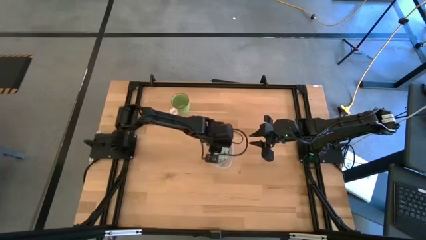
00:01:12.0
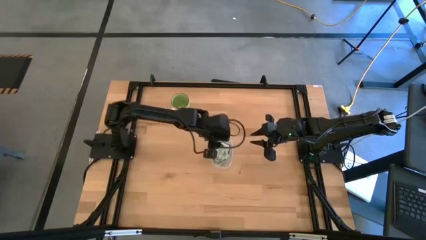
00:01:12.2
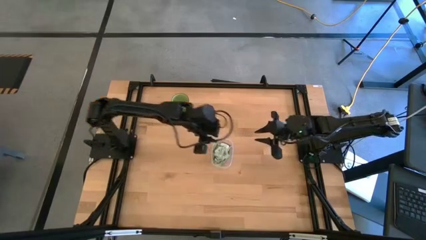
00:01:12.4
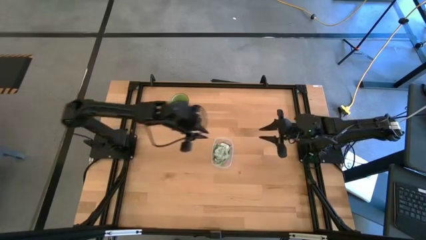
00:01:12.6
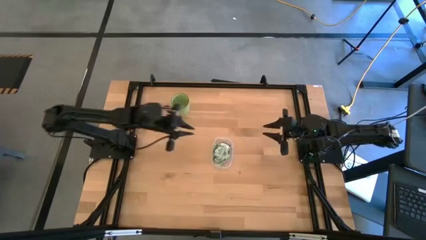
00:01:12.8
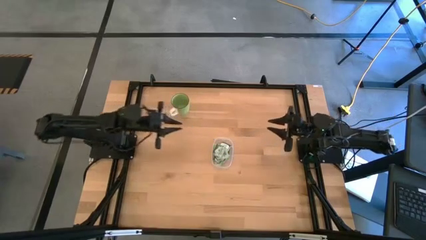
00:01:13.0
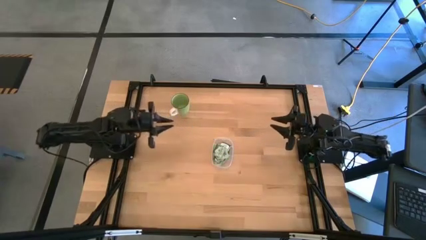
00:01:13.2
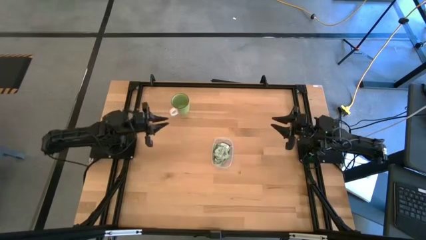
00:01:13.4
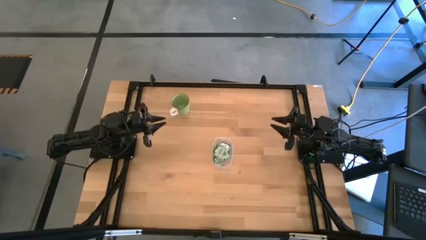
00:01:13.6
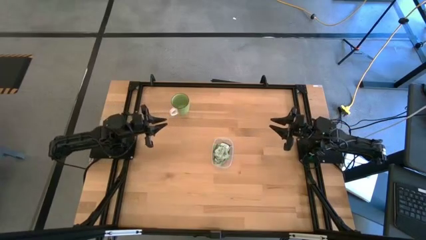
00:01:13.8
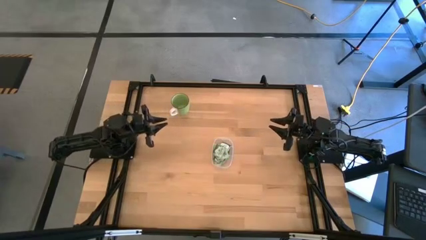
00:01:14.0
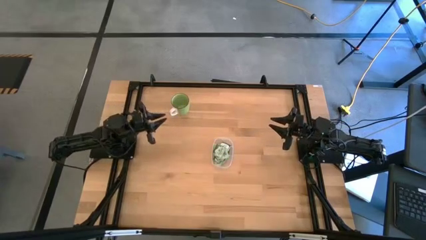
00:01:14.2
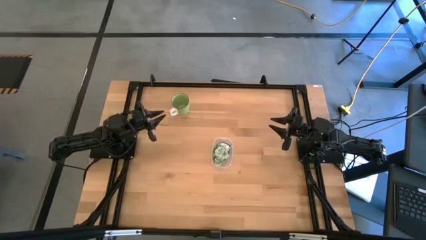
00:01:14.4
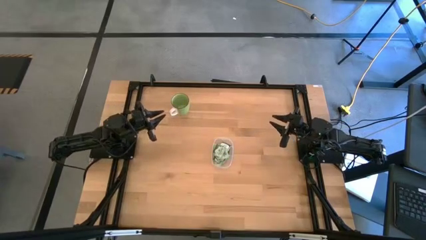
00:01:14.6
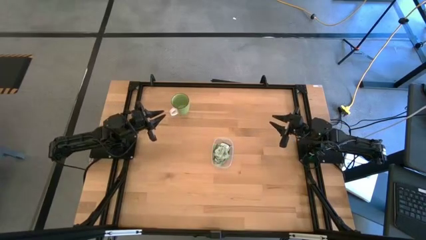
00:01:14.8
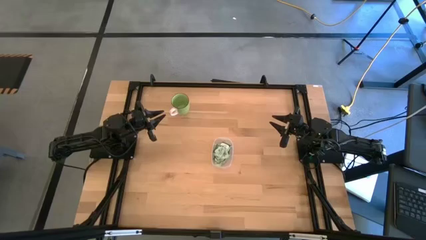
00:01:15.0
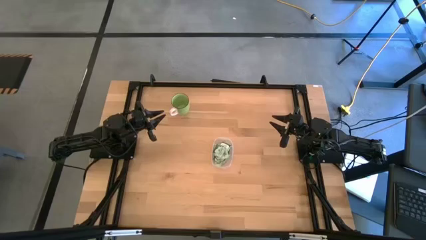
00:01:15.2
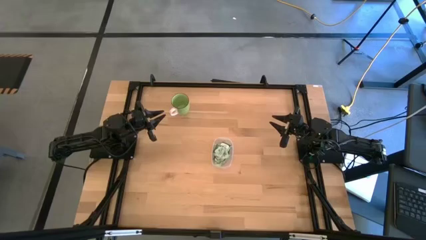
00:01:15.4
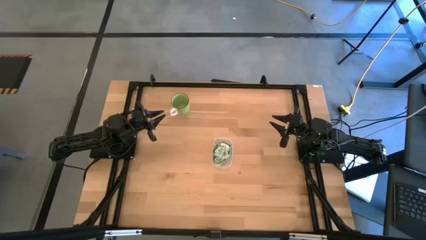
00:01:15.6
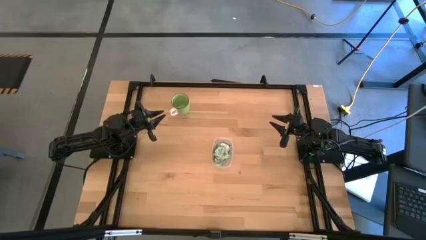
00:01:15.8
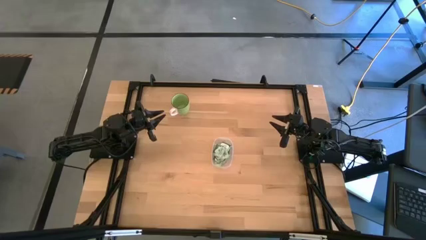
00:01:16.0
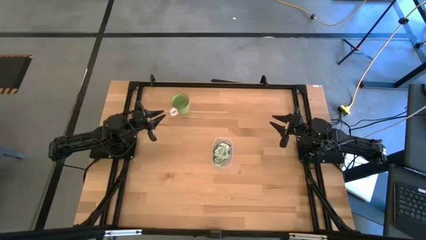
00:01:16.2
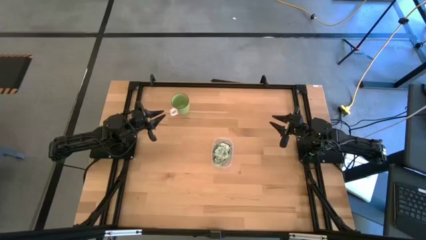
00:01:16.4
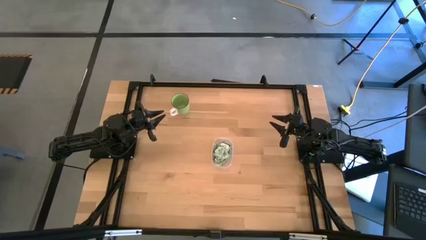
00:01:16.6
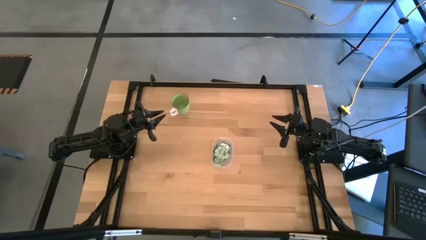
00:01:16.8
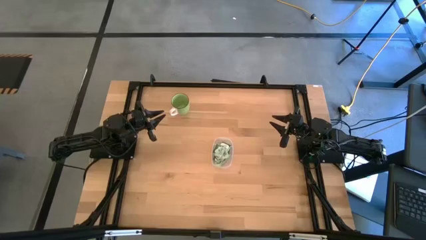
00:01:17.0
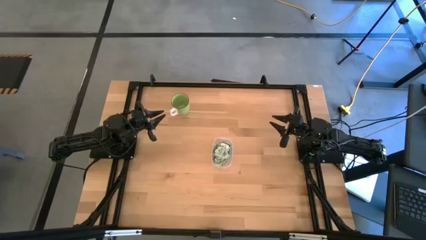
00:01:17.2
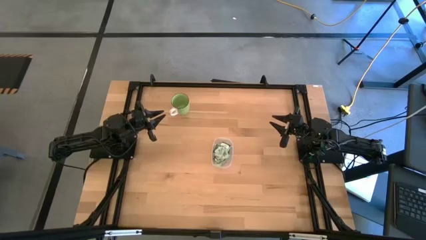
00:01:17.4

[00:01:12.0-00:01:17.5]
Task: Pick and place items into bin
Return to Home Position

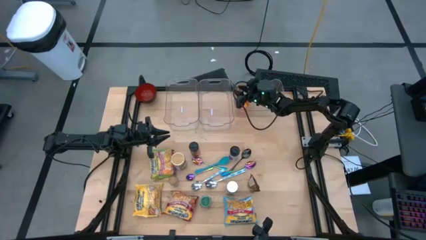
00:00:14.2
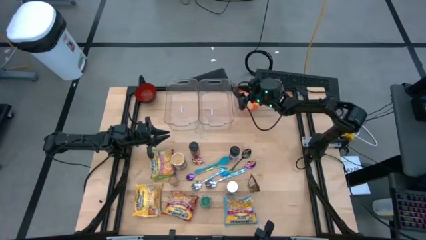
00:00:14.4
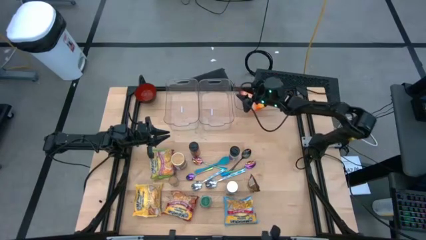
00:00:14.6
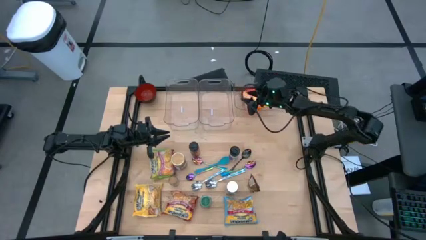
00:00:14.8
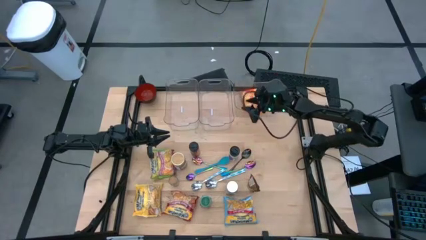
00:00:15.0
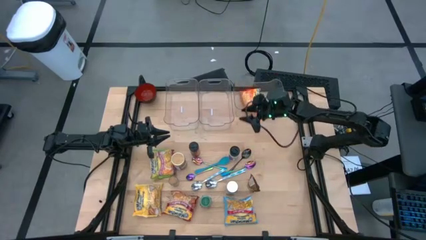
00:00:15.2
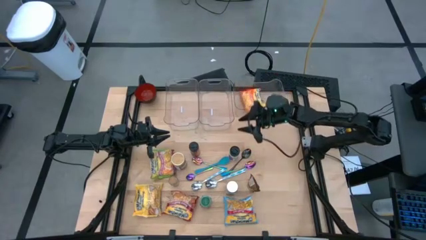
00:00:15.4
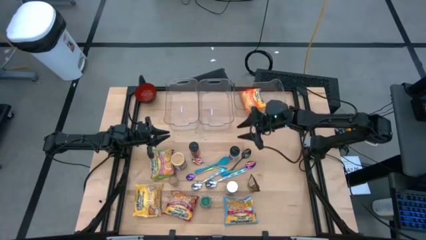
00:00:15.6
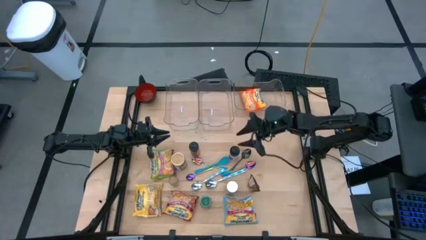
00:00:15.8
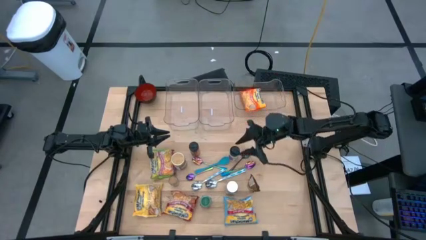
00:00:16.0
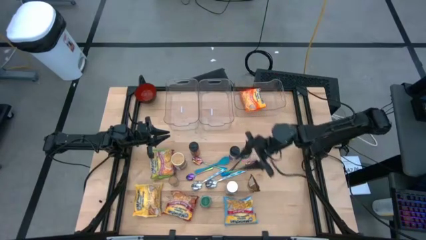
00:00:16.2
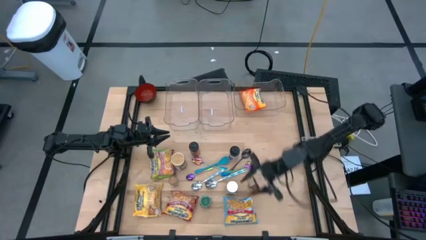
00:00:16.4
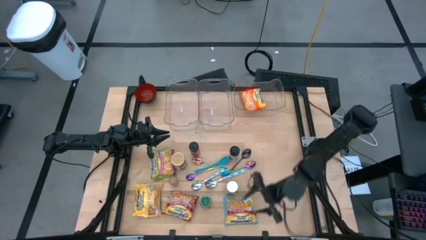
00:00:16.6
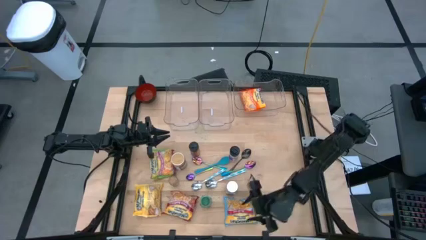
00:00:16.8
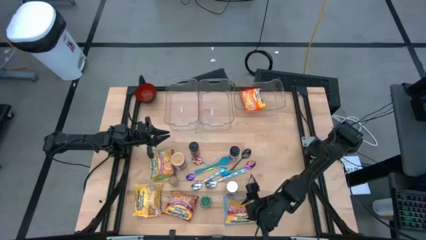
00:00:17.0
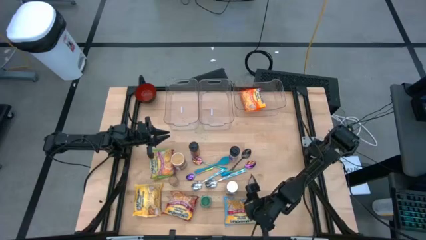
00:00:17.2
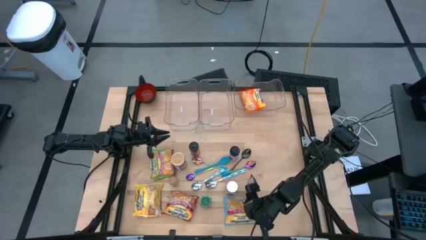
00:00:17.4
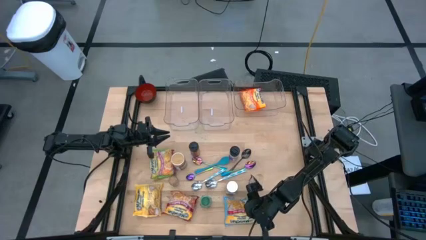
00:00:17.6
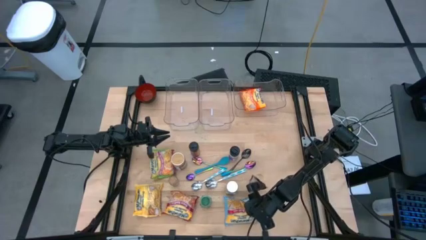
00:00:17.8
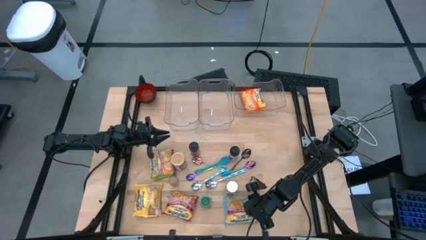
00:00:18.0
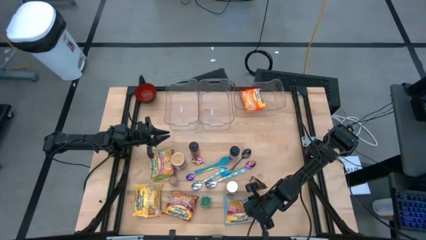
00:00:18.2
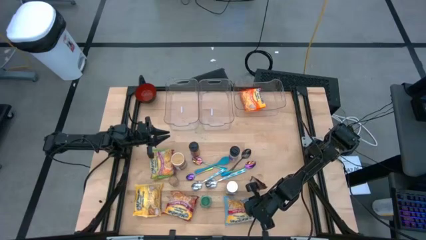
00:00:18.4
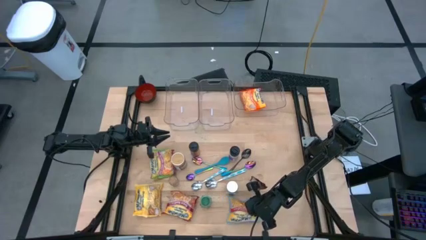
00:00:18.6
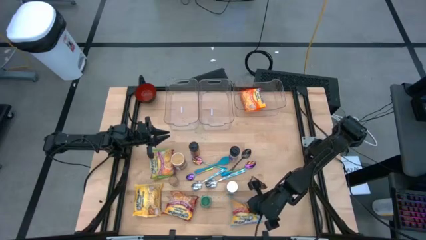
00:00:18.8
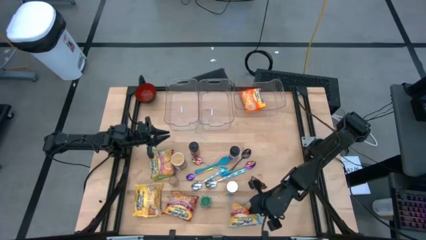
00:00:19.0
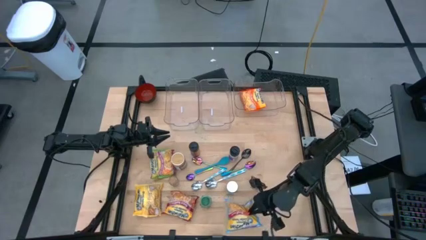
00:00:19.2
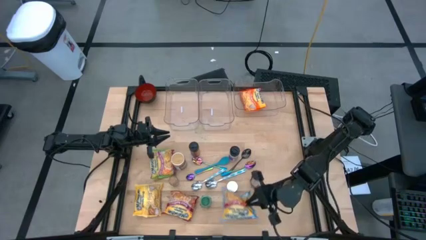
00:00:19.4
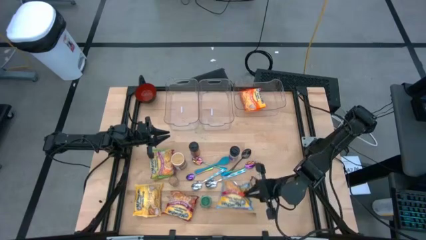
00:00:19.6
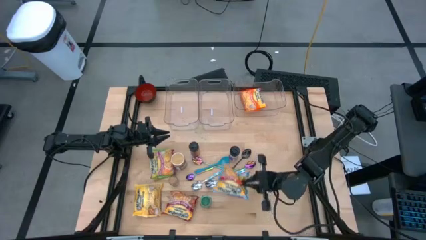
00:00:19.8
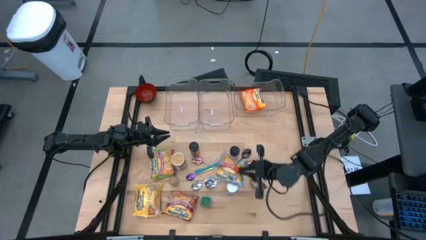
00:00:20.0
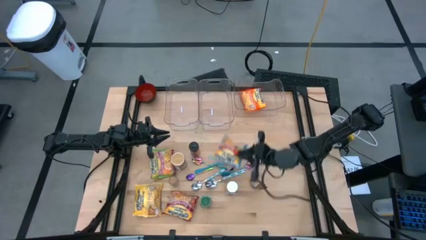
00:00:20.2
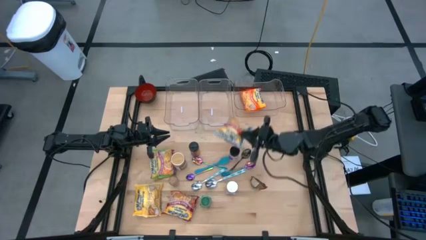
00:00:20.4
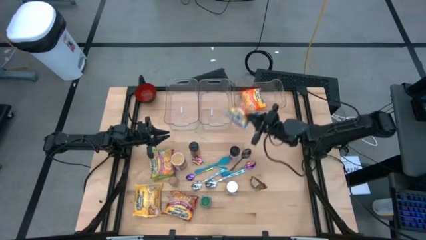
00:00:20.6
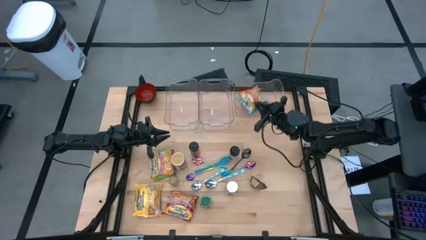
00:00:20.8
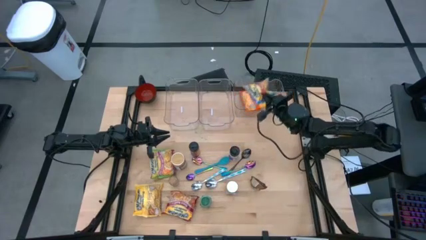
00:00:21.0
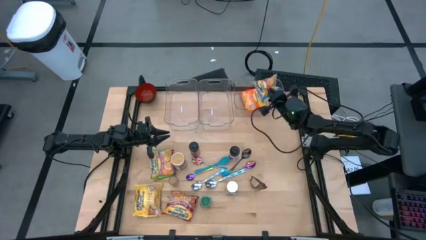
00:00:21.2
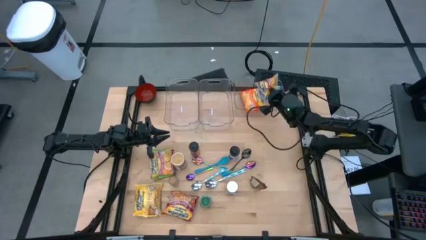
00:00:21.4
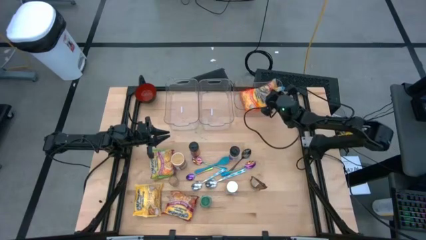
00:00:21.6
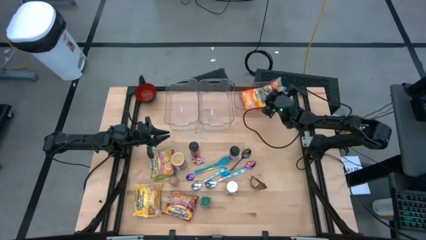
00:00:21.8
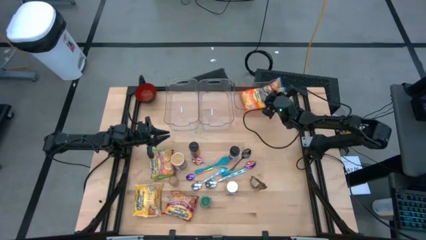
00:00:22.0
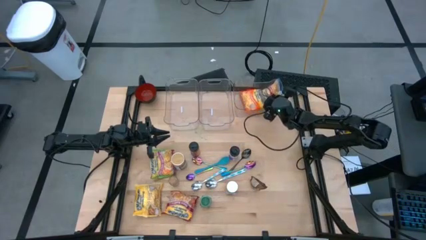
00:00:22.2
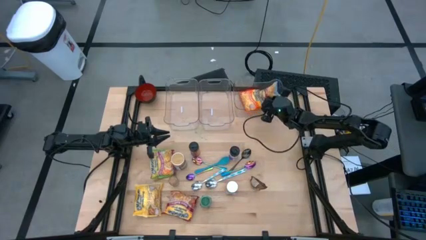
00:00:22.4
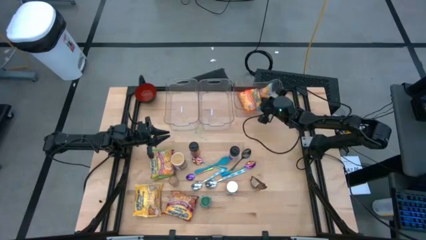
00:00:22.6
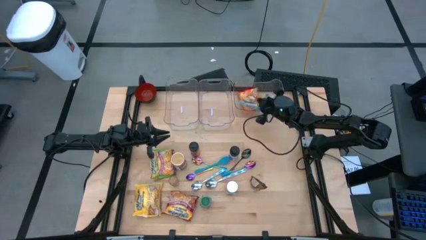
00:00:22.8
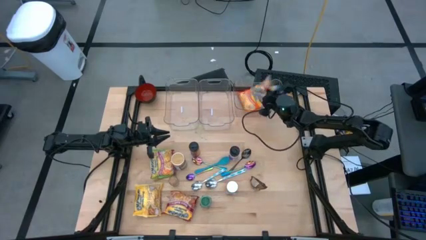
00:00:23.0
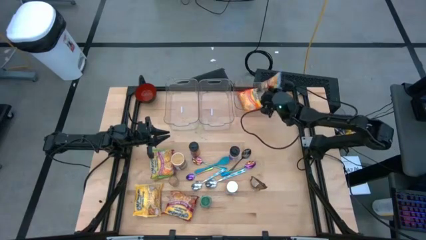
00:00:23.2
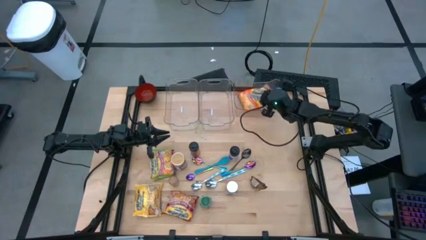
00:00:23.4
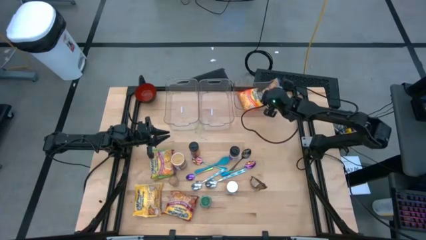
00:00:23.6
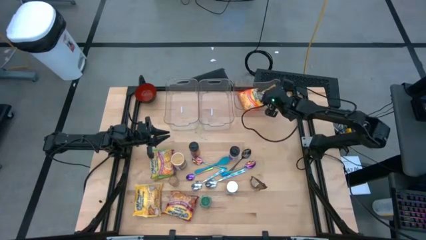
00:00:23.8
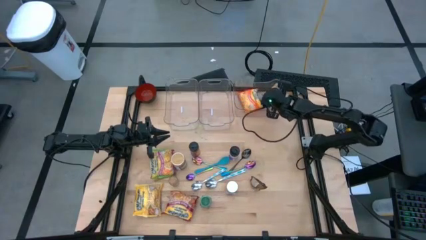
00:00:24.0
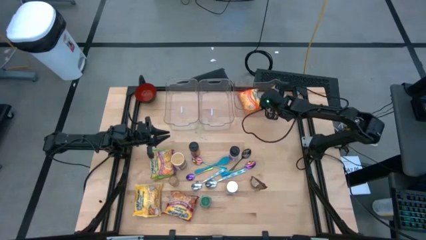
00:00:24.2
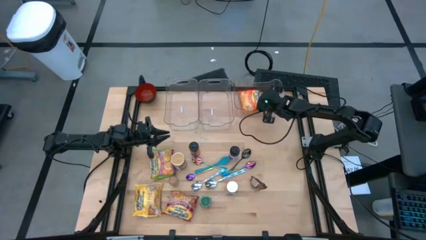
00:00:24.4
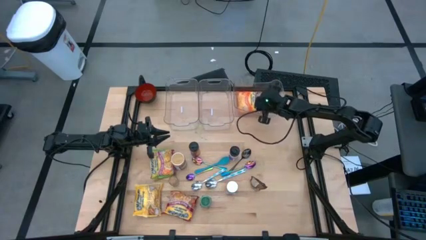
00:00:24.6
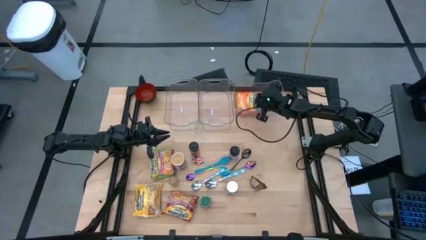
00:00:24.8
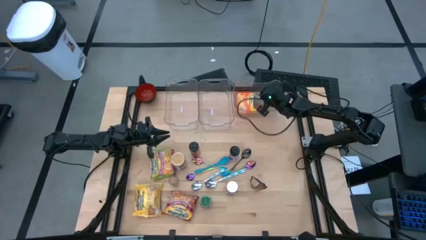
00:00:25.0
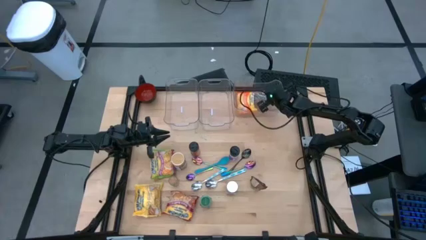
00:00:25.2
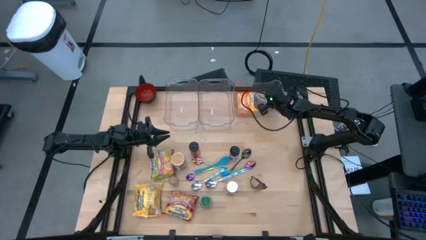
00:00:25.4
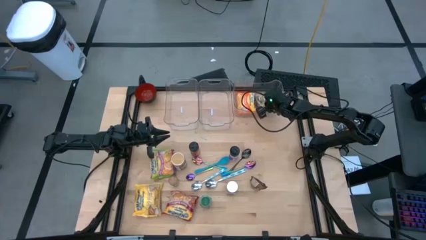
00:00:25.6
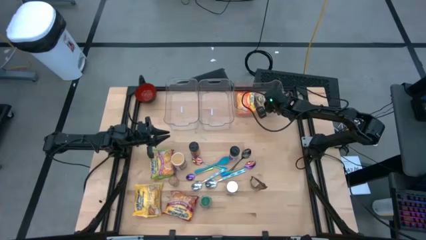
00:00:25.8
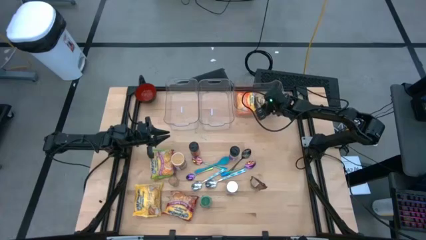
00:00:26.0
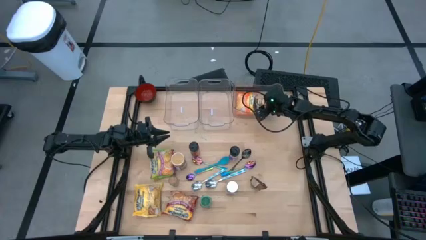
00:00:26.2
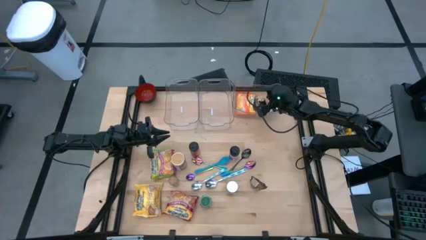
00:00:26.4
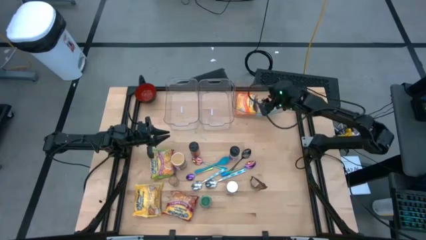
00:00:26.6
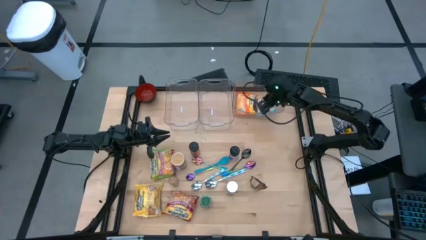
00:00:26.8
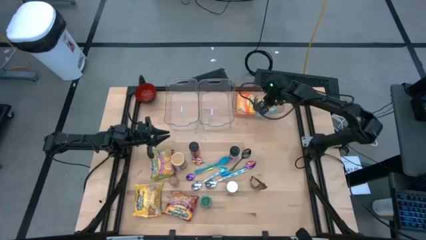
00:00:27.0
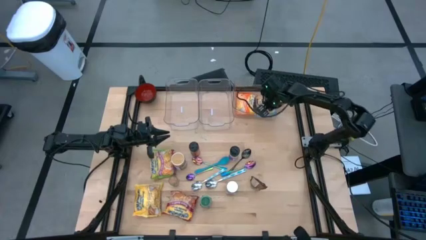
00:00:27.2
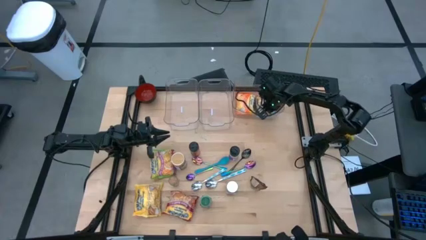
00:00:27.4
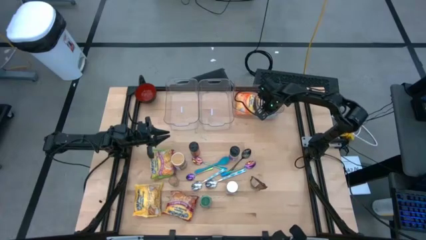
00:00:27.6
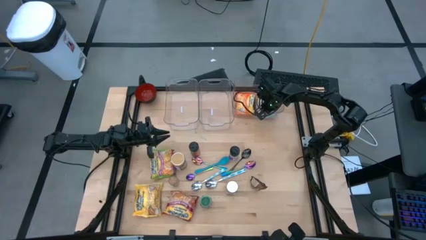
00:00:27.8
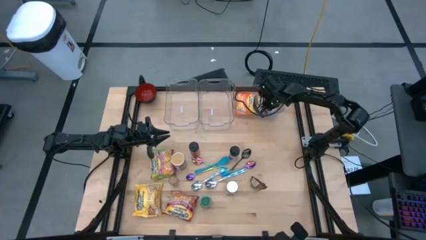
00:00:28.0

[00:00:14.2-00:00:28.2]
Task: Pick & Place Food Item
Put the blue noodle pack into the right transparent bin
